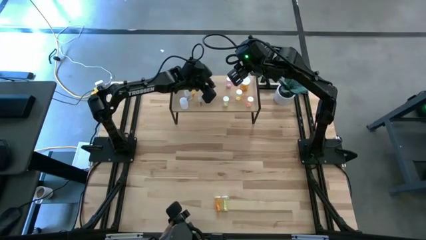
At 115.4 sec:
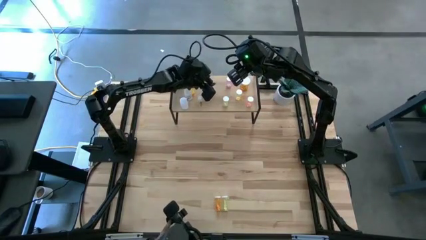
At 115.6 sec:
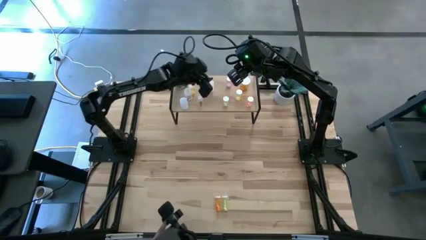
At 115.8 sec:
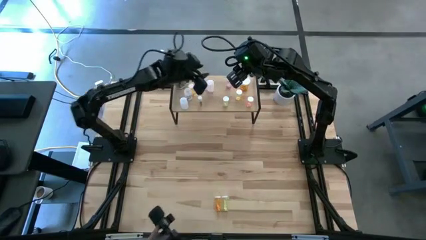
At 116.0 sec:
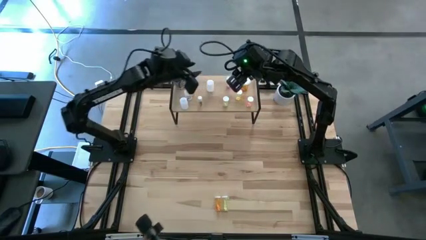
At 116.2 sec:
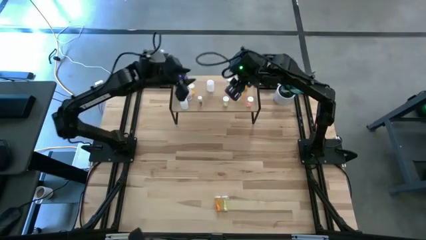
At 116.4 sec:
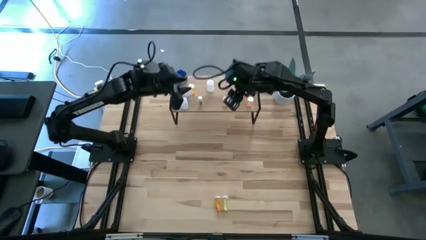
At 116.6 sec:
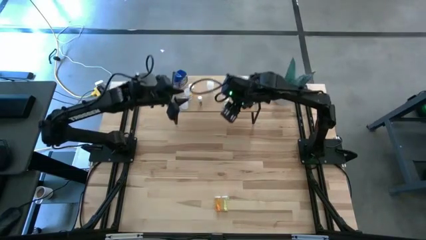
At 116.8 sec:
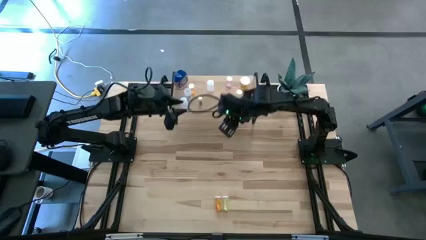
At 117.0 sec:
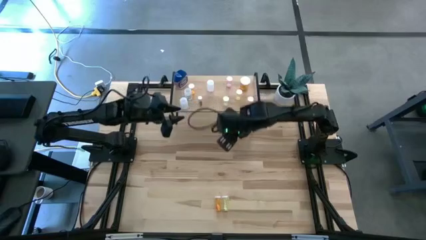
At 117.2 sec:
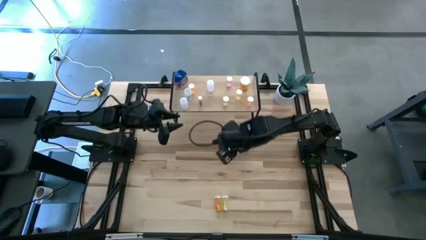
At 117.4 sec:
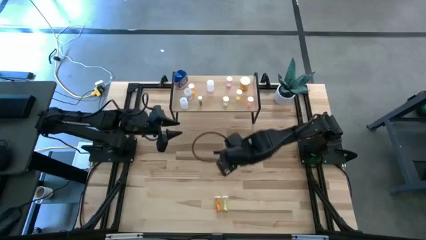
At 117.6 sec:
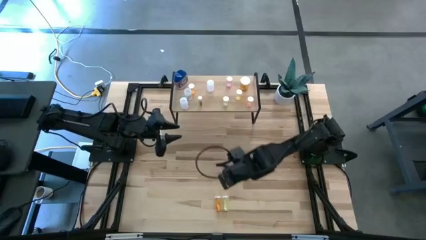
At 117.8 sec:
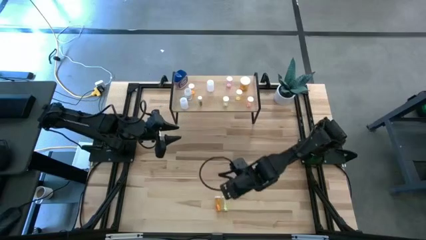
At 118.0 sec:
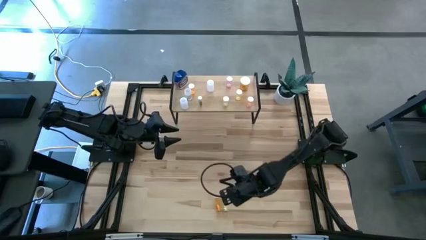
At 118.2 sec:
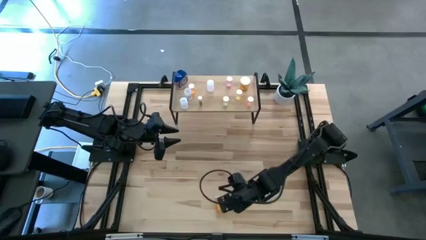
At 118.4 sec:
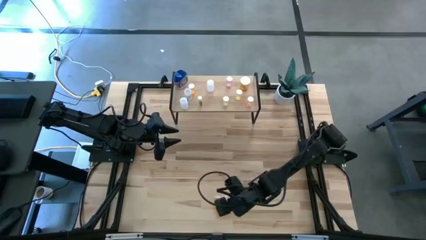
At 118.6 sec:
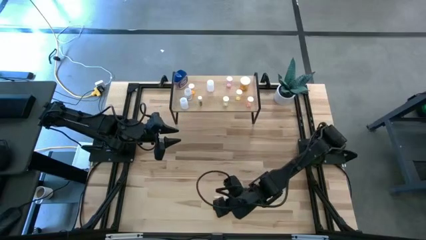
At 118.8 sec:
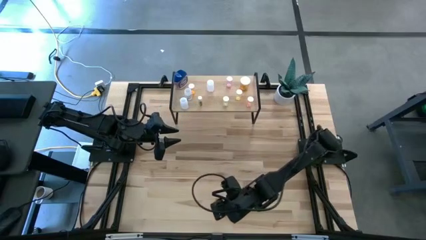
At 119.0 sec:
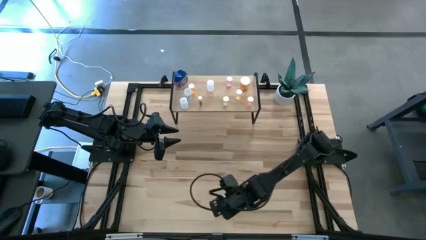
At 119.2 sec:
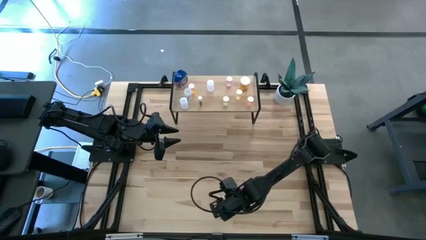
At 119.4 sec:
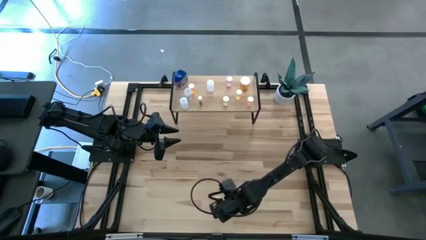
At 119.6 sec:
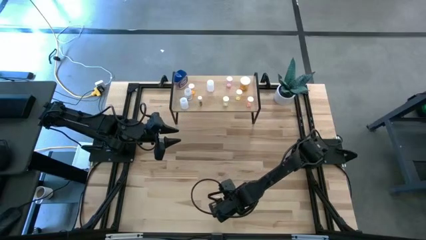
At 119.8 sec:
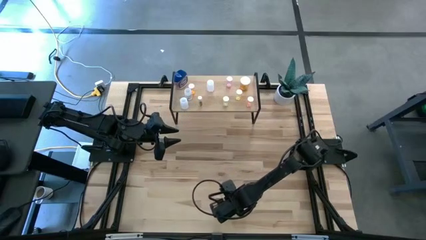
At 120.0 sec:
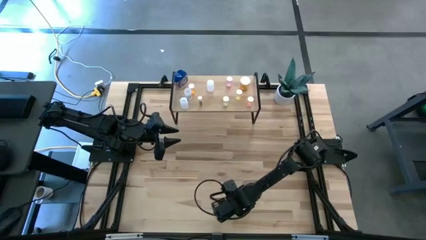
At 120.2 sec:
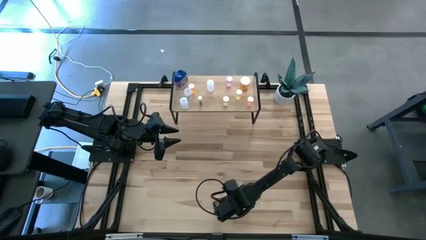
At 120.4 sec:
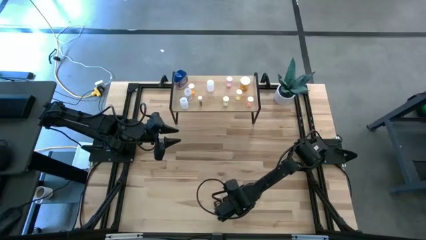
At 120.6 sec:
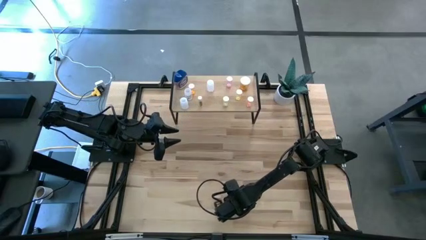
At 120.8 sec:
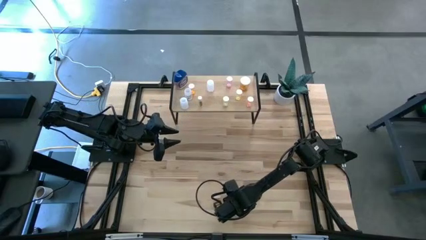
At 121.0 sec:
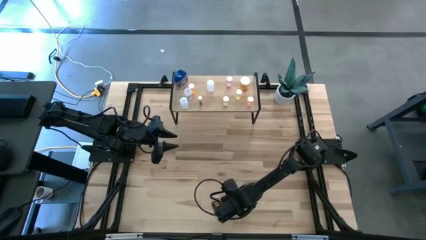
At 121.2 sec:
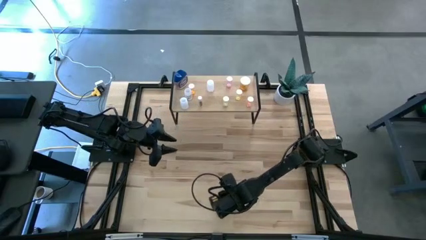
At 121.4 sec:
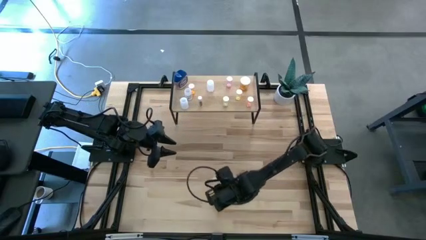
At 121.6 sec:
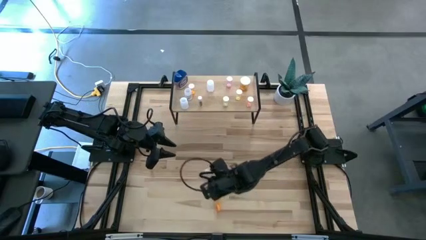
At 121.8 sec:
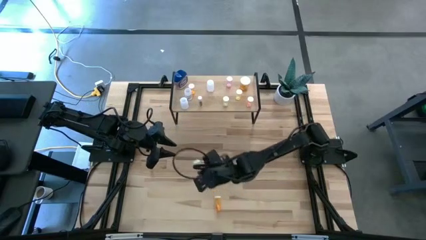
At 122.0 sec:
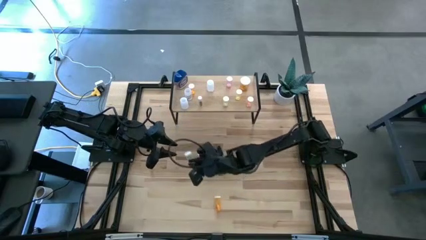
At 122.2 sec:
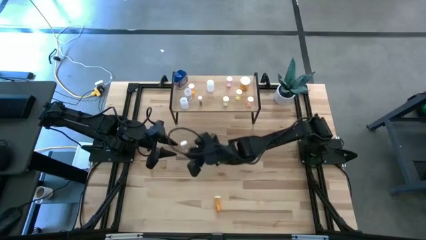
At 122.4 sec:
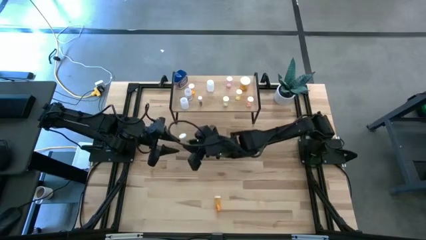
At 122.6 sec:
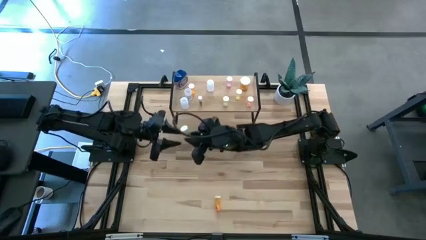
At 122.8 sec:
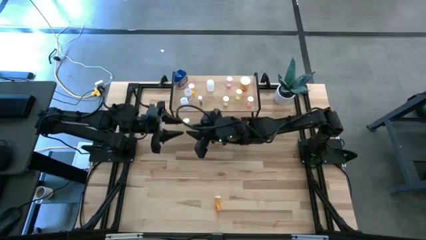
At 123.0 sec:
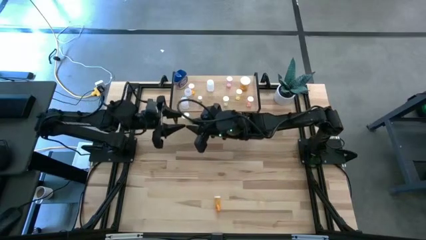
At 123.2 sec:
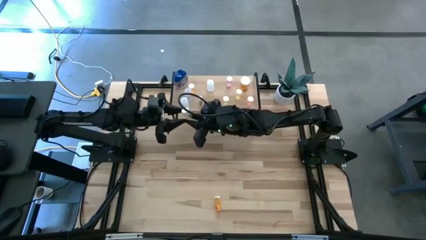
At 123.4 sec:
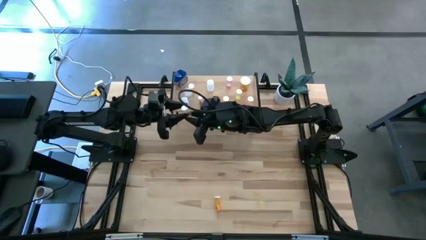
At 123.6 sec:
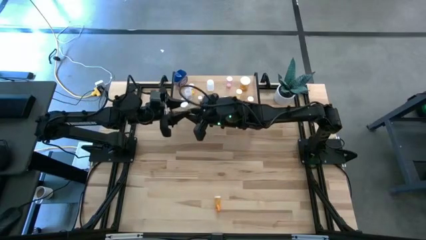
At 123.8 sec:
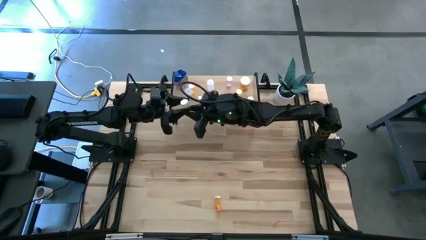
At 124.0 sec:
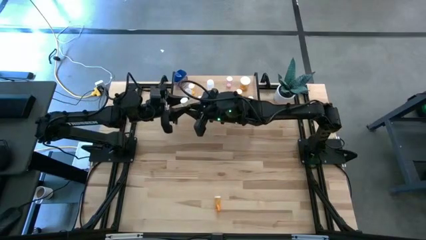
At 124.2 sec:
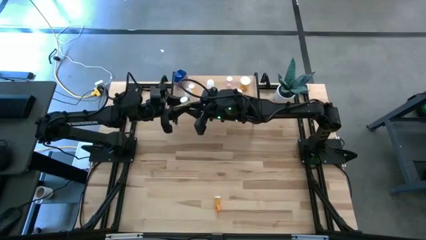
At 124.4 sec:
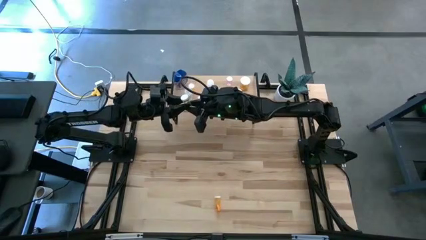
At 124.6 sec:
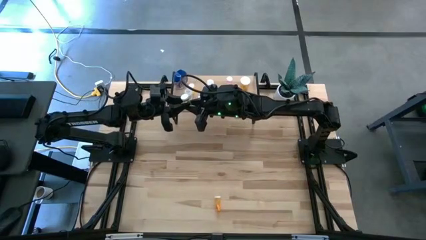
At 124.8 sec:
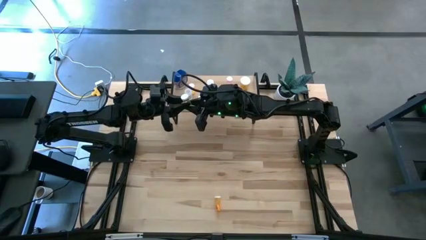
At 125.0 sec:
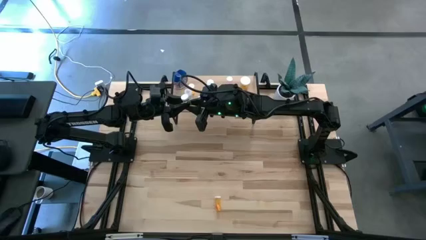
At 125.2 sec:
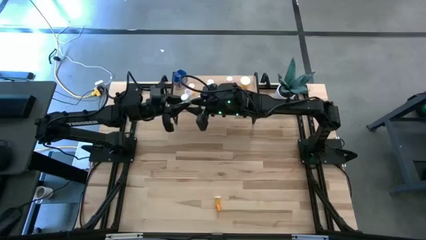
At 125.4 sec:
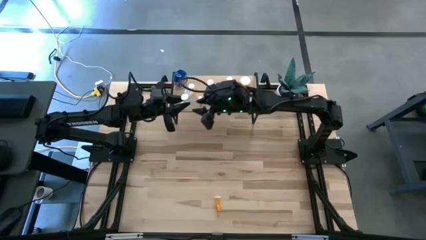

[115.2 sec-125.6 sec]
Task: Pick and place medicine bottles onto shelf by color
Put the yellow pill bottle on the shelf

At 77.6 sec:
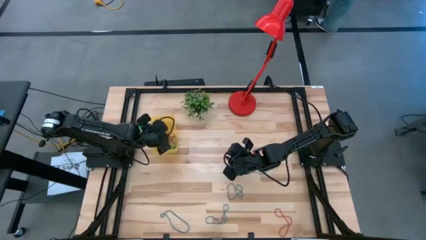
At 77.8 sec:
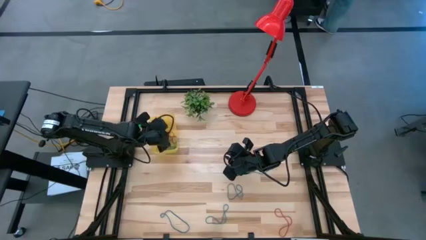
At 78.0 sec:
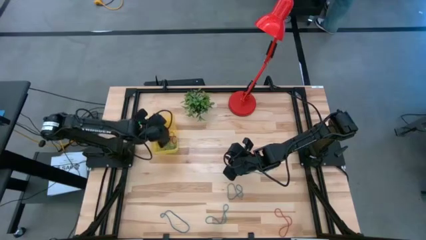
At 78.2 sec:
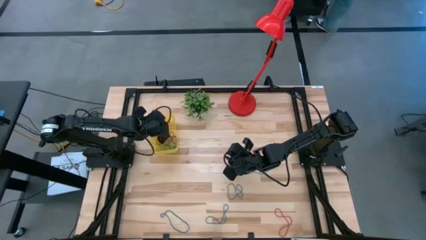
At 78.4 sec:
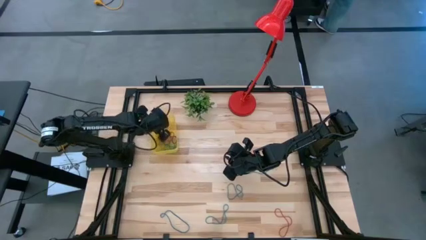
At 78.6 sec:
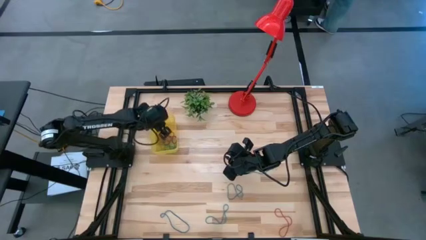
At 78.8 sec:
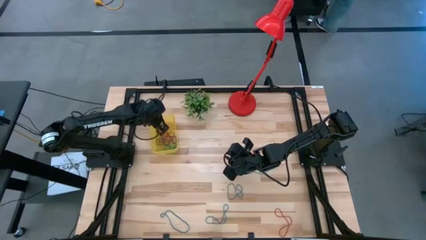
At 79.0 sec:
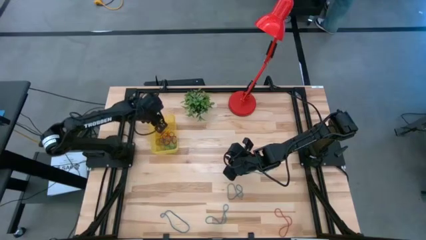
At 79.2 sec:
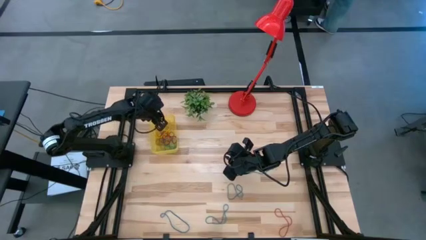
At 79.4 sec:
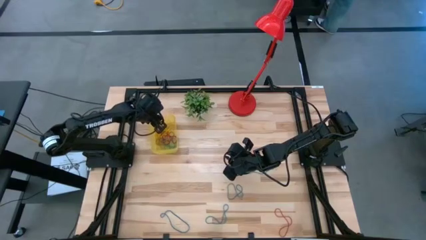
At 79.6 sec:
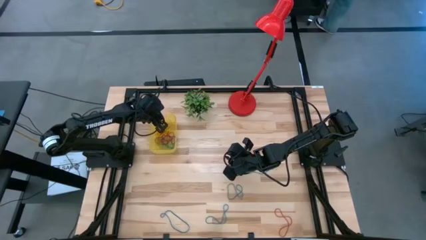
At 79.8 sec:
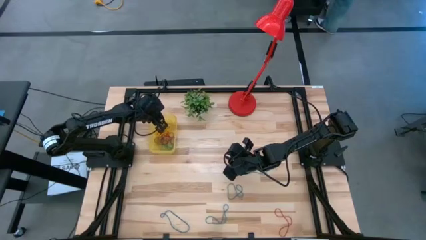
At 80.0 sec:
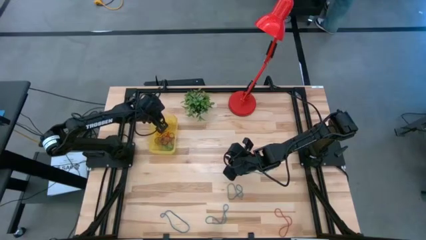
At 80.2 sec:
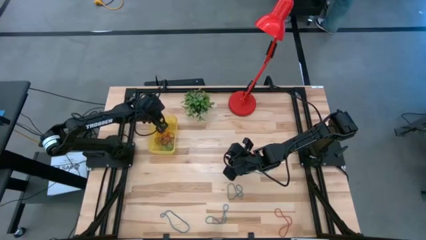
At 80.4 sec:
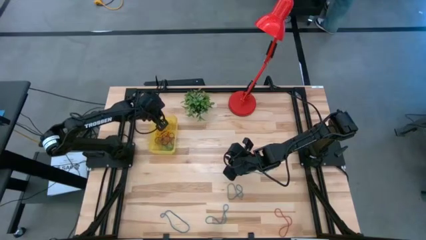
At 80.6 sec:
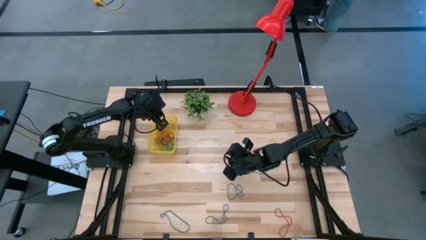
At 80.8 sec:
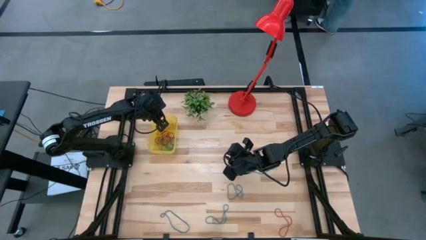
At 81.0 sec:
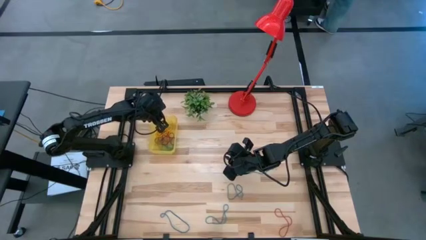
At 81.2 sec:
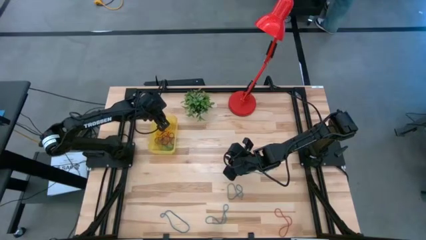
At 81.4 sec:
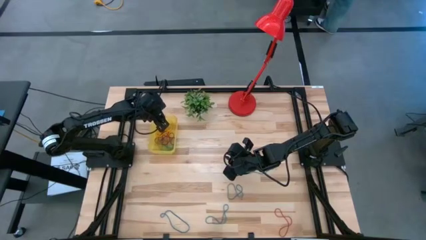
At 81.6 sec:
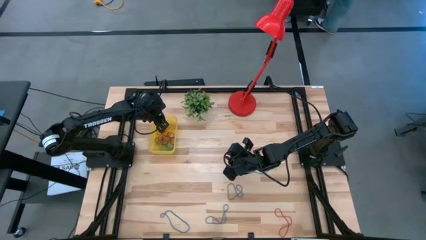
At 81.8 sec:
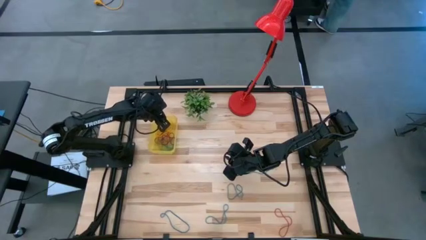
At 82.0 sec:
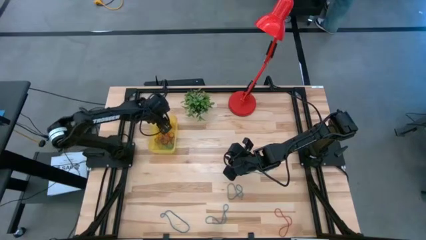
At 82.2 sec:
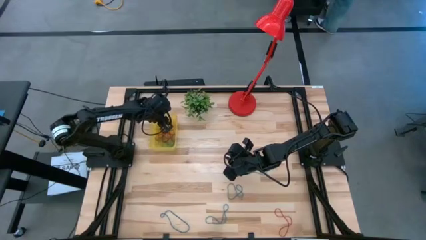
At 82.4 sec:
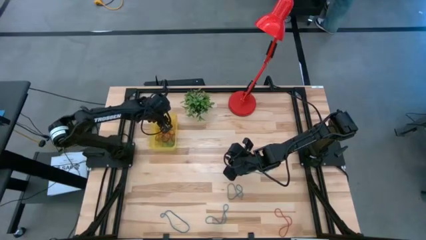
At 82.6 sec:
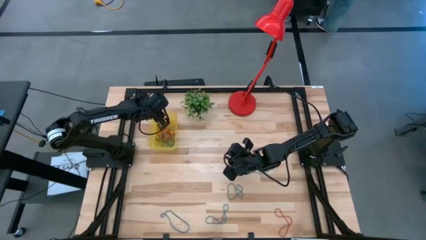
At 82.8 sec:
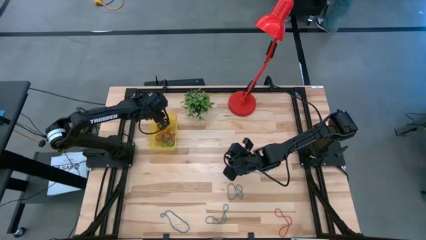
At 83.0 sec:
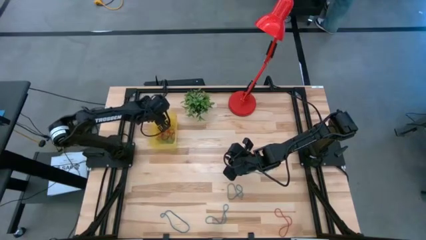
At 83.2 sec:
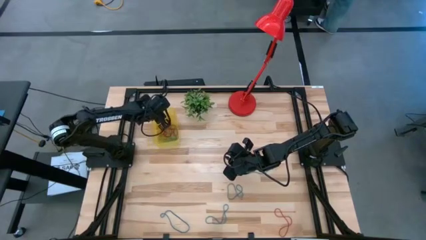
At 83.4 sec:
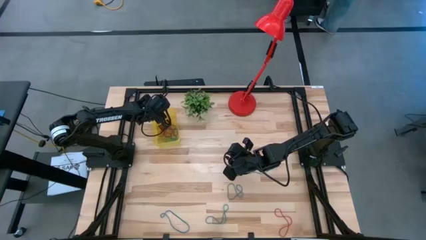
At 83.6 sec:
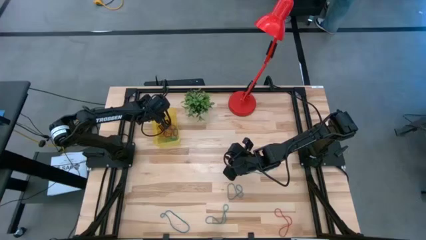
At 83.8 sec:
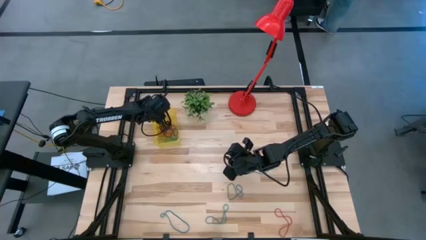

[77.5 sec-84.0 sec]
Task: Pick and place items into bin
Adjust the yellow rubber band into the yellow bin
